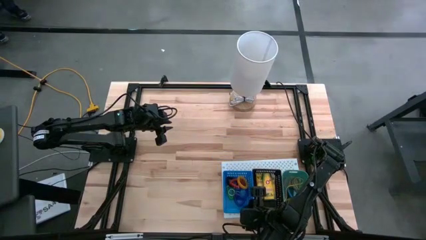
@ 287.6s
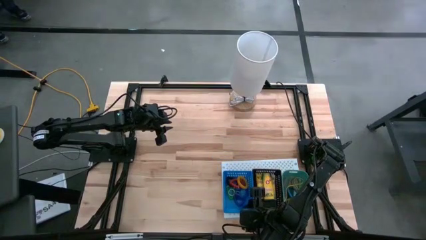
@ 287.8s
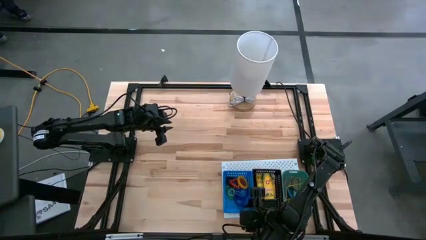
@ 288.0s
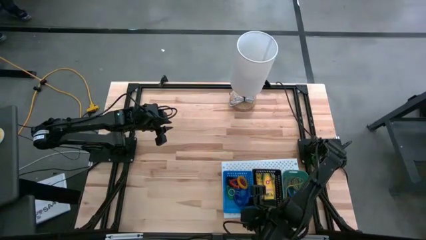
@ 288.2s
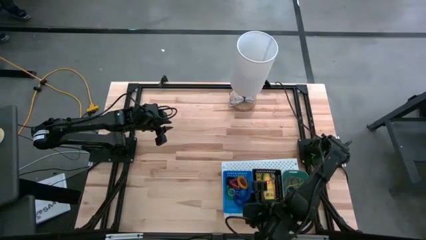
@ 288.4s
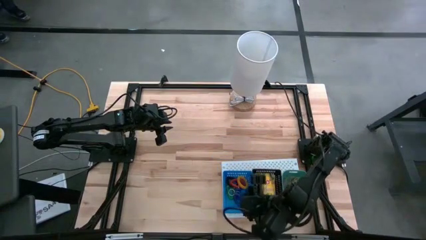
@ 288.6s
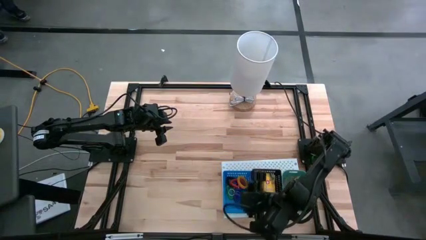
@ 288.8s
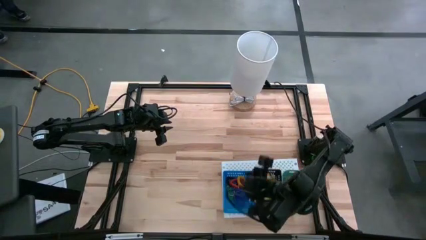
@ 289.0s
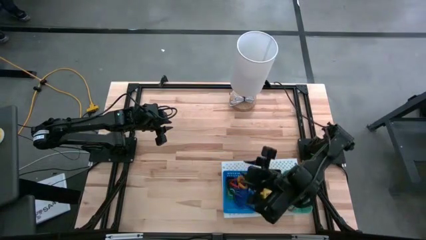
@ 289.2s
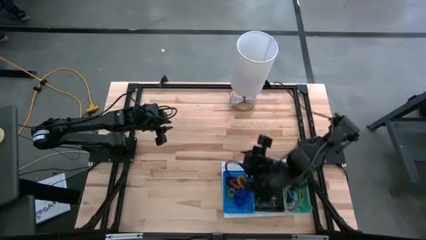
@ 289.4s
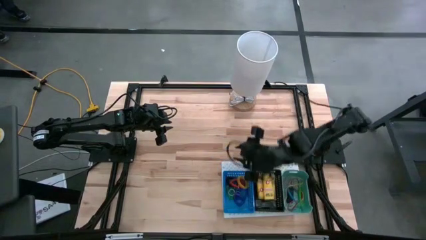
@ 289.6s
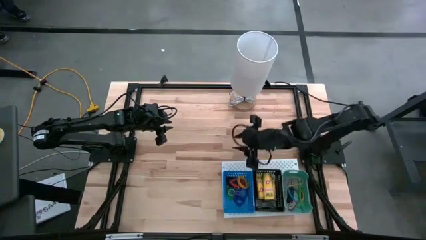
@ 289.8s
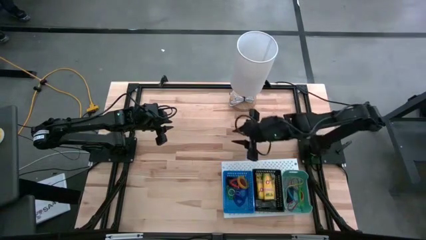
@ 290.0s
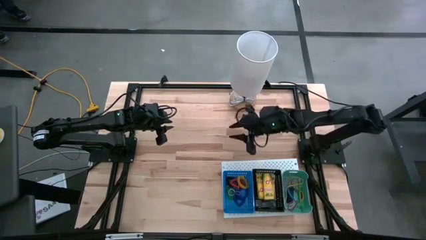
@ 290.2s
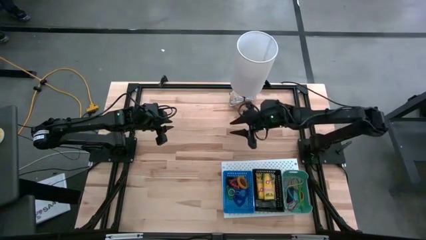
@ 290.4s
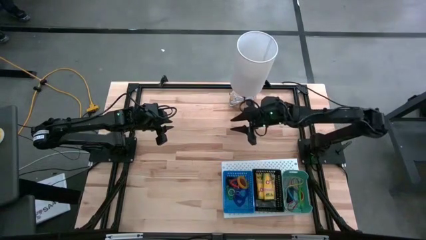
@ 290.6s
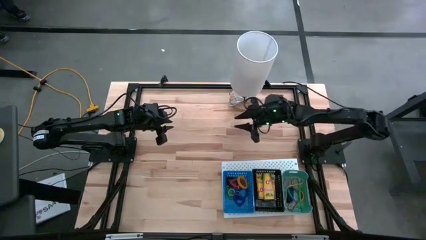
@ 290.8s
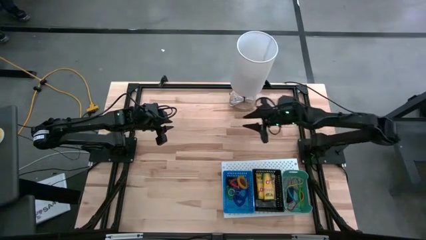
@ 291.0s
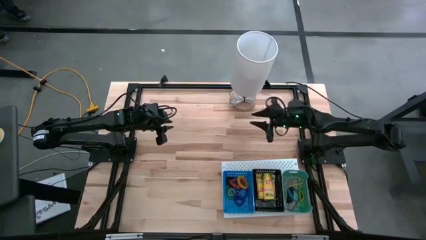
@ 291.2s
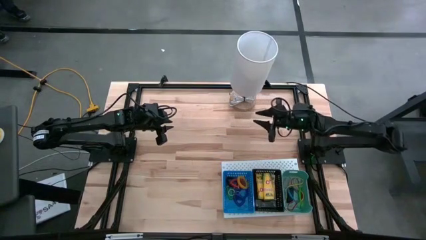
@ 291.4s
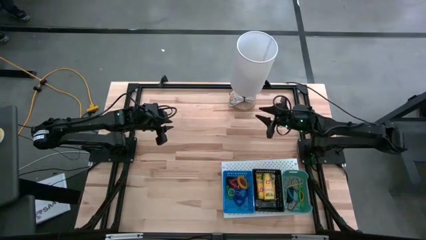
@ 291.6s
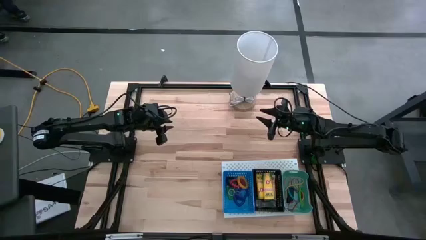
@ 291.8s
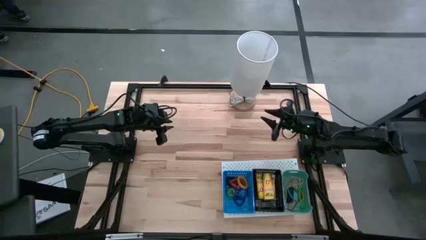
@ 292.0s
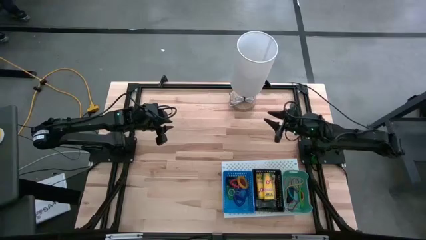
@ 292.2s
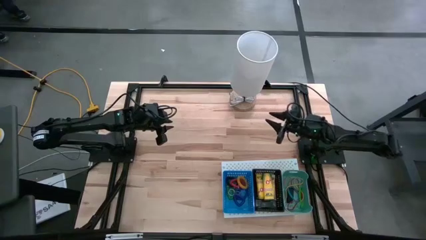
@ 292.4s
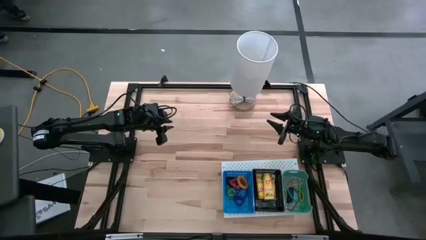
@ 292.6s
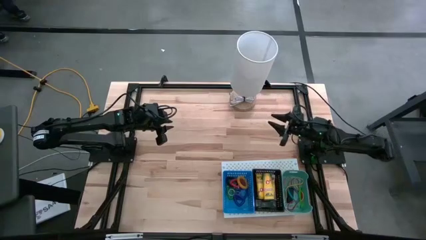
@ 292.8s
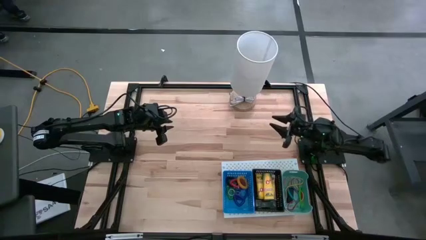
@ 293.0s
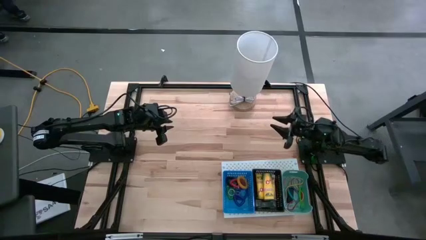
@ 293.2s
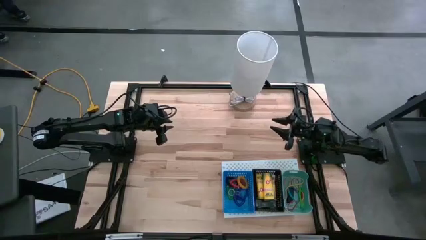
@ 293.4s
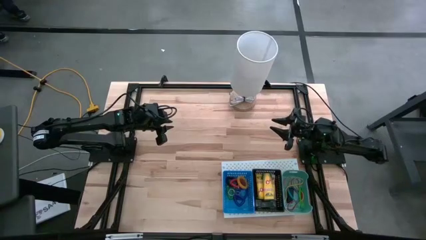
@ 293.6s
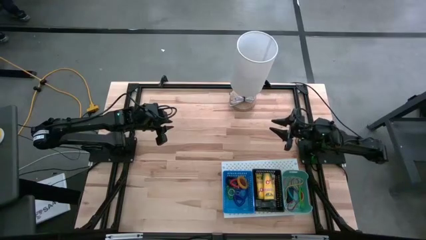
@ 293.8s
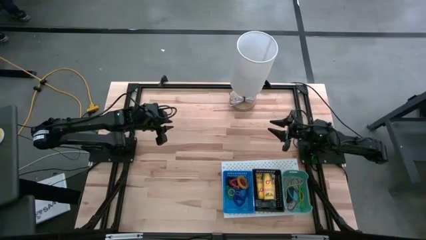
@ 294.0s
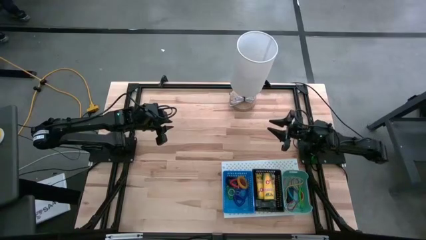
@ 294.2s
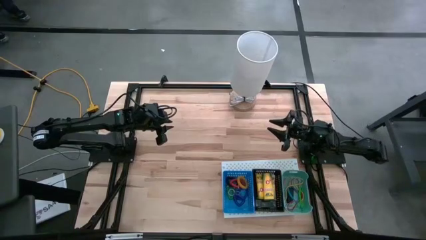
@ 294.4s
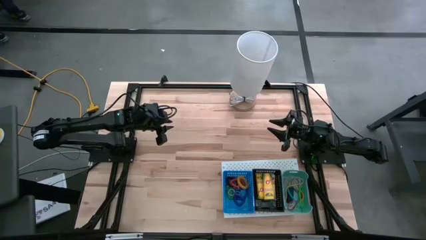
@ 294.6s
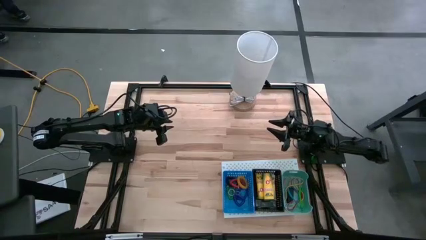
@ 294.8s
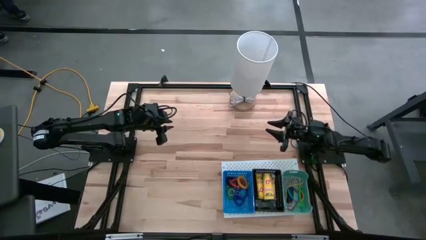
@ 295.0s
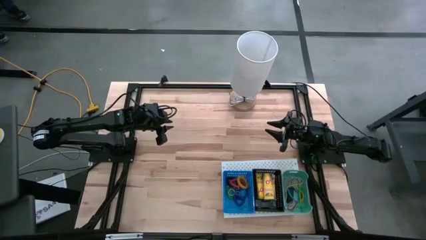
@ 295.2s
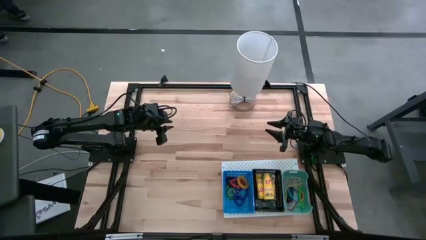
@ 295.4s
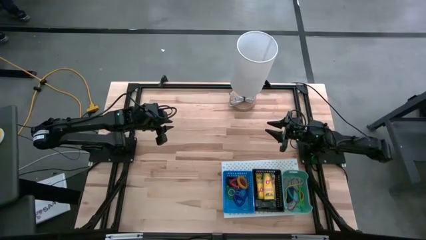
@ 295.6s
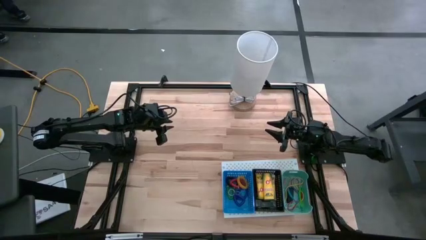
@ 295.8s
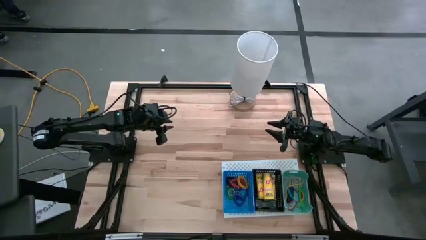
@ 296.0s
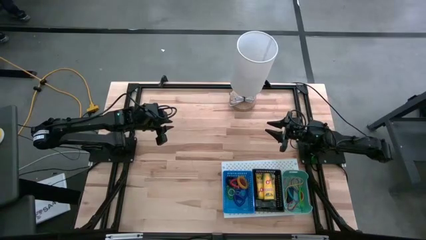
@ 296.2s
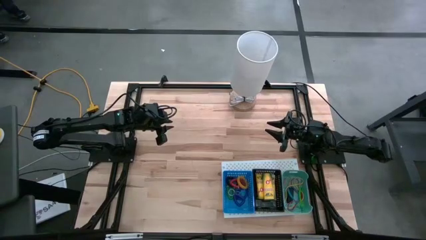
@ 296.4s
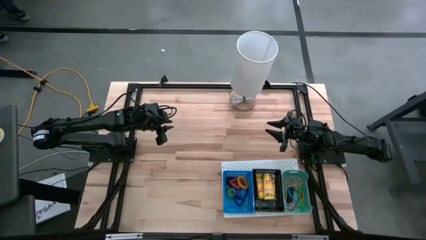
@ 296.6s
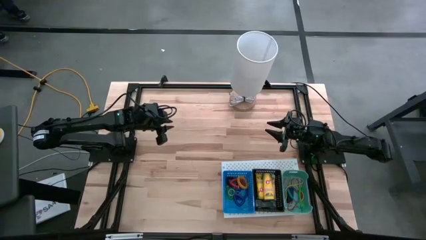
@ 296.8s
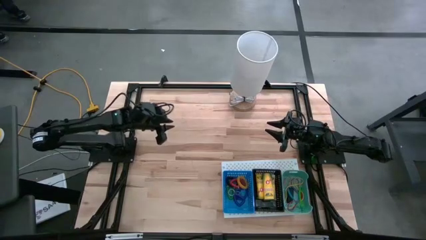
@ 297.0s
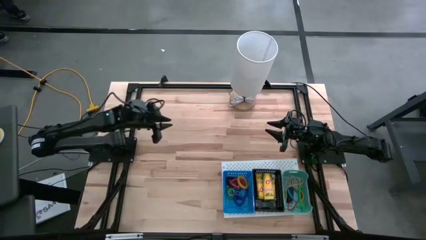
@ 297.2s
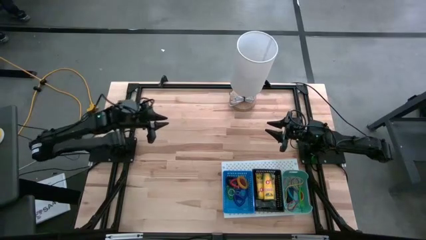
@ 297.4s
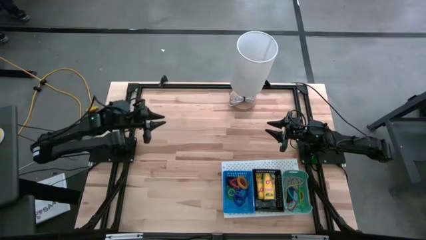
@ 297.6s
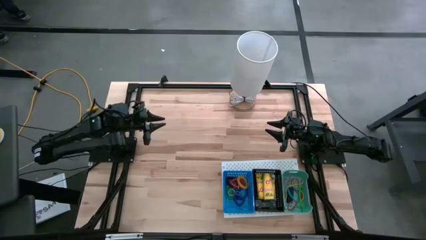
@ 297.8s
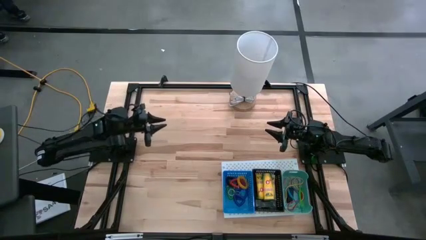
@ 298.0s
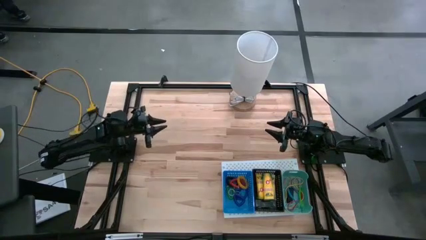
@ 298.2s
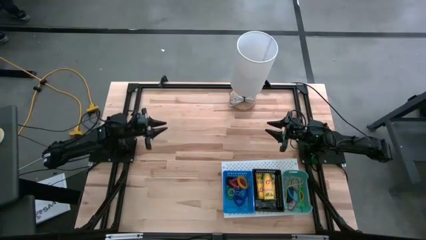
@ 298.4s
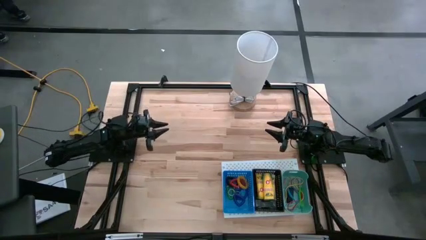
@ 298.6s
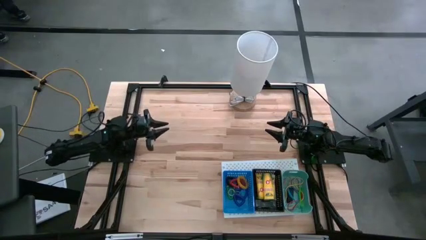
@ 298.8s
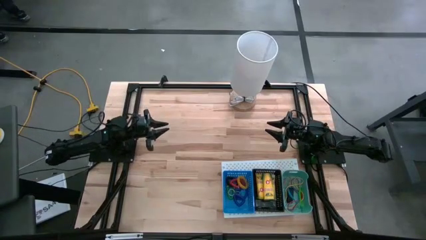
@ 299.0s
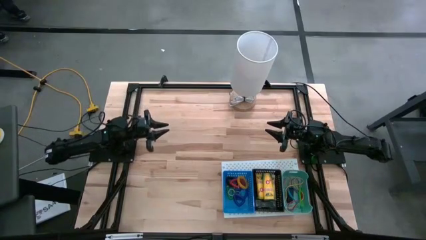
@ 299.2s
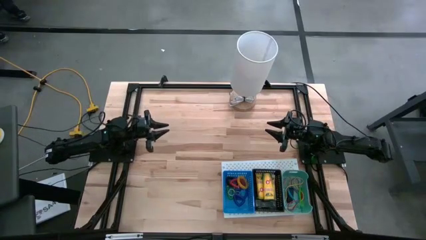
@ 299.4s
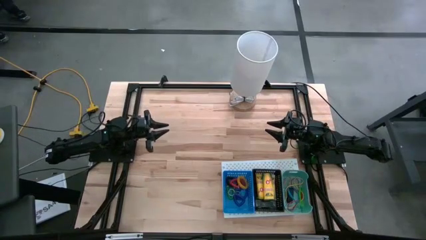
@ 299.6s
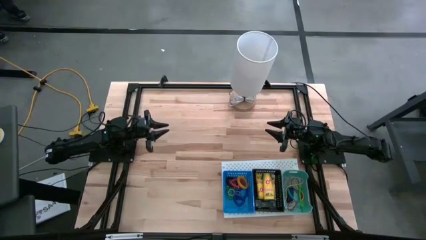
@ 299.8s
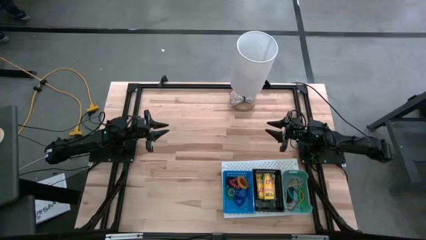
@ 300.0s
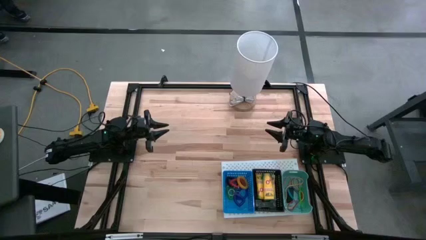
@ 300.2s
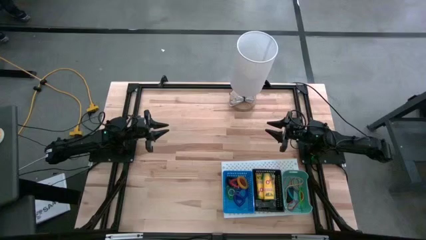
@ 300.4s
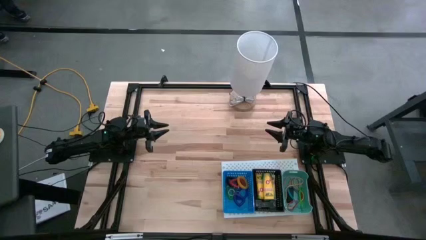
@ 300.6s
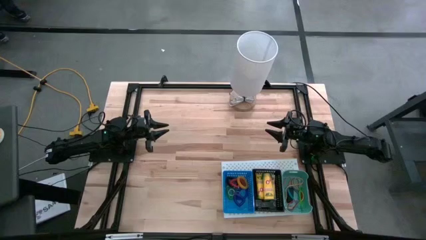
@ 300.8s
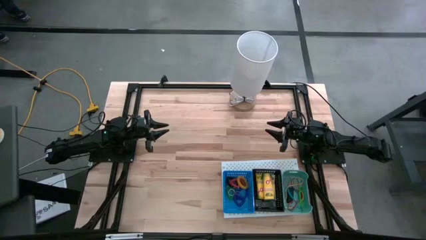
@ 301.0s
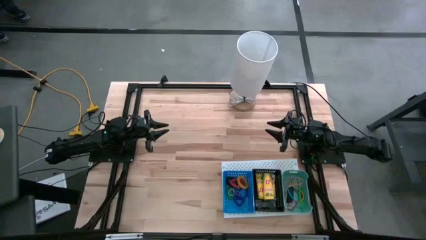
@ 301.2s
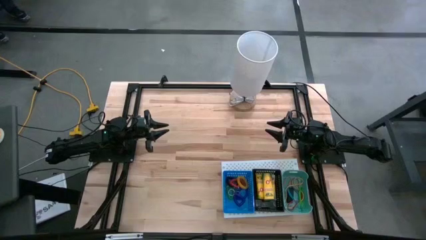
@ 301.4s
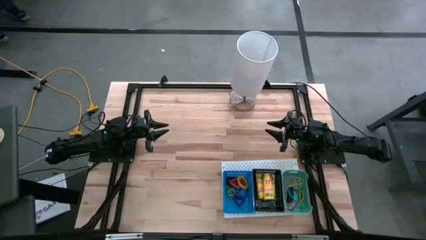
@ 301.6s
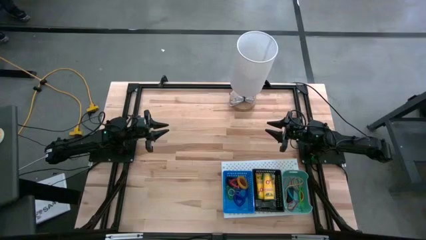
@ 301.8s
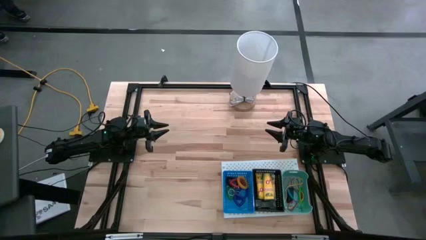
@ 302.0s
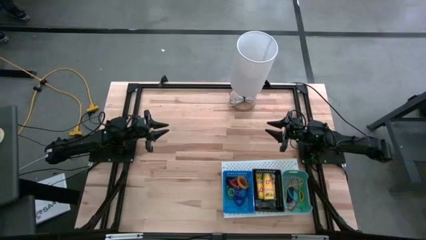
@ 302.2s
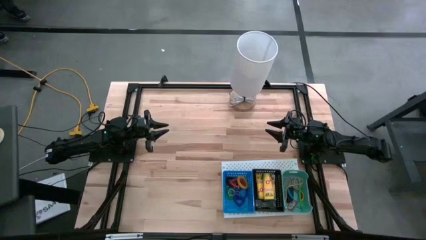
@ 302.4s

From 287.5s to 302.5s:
Task: Pick & Place Office Desk Supplies
Return to Home Position
